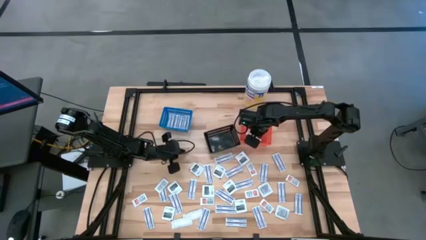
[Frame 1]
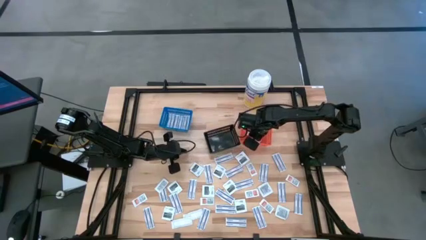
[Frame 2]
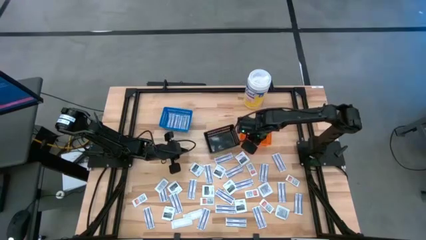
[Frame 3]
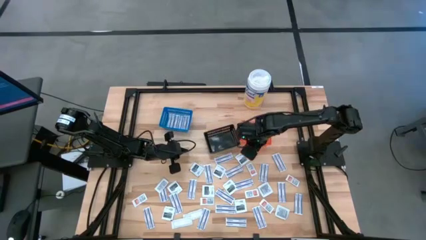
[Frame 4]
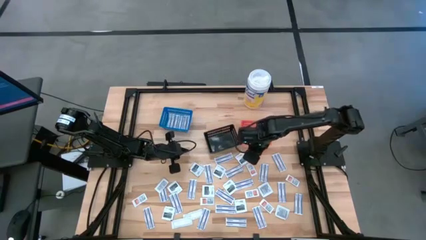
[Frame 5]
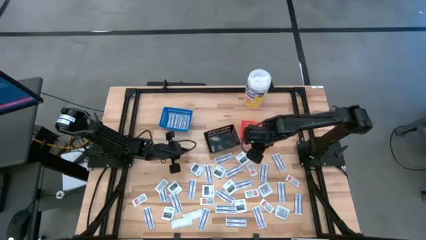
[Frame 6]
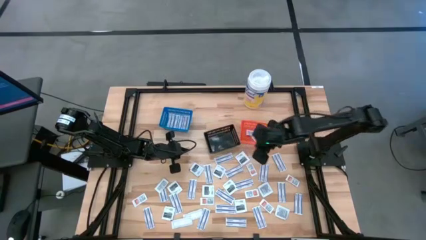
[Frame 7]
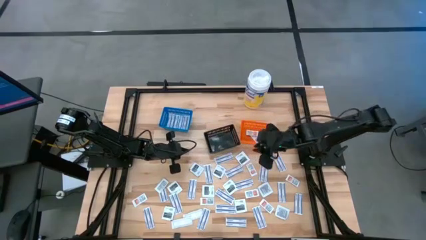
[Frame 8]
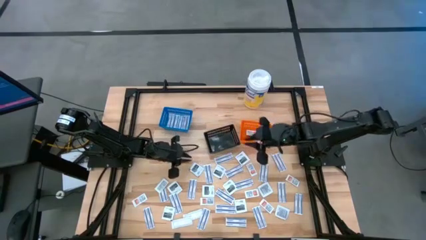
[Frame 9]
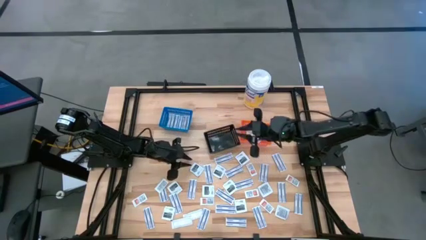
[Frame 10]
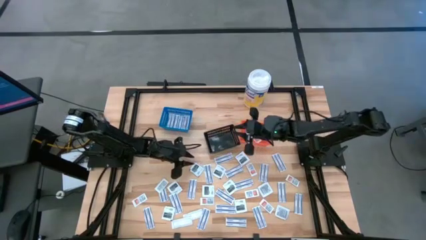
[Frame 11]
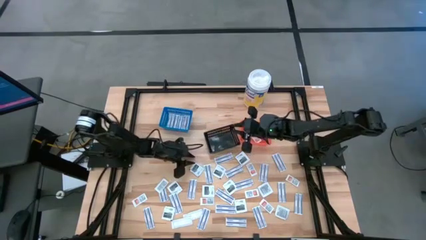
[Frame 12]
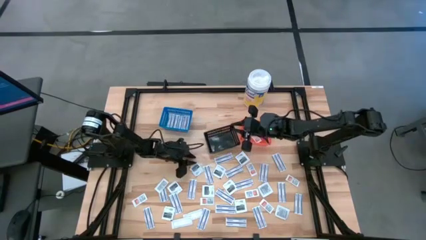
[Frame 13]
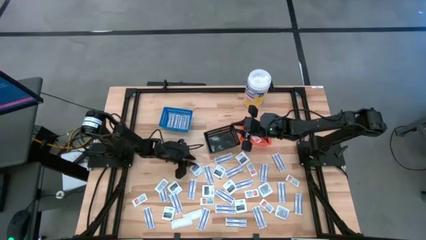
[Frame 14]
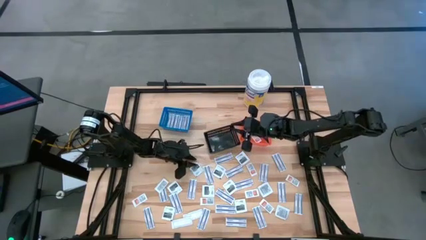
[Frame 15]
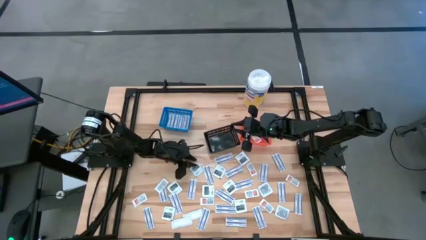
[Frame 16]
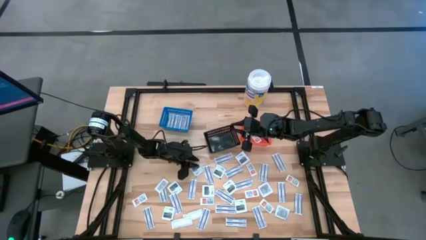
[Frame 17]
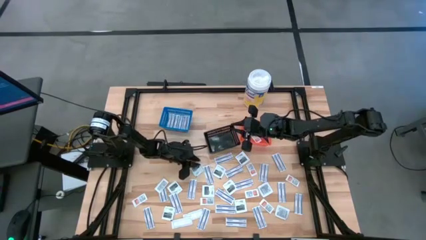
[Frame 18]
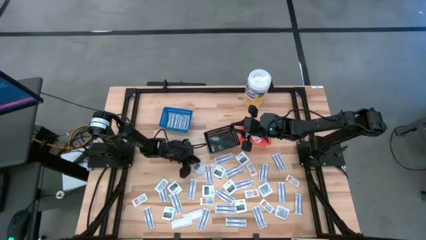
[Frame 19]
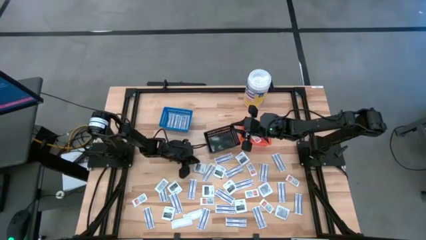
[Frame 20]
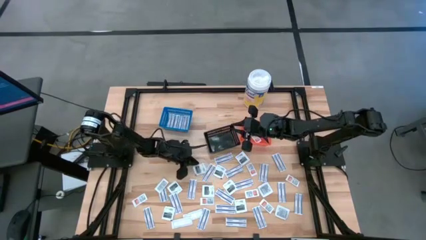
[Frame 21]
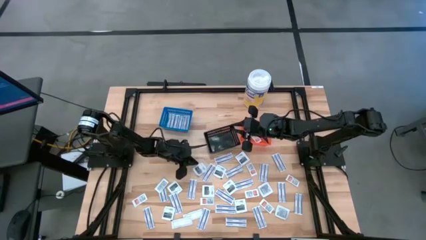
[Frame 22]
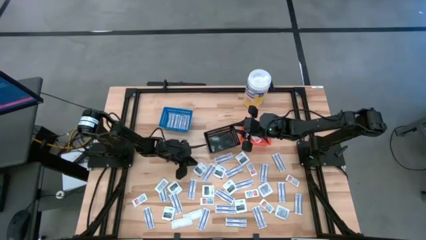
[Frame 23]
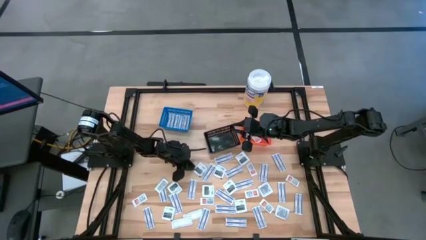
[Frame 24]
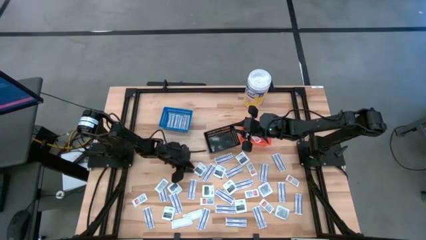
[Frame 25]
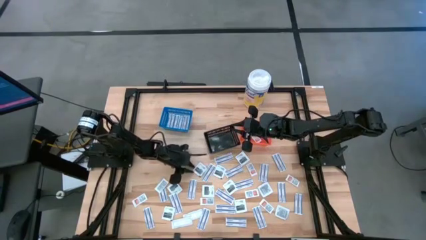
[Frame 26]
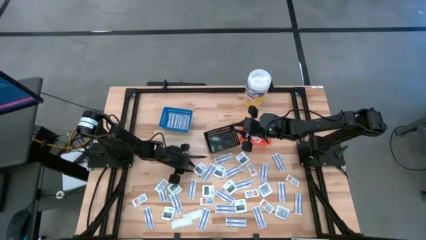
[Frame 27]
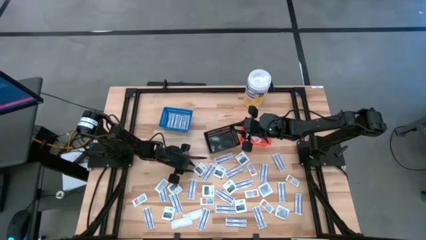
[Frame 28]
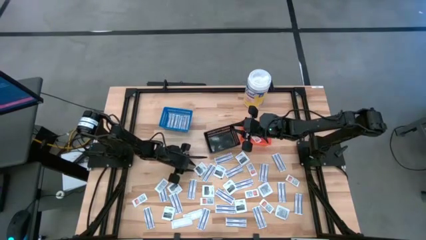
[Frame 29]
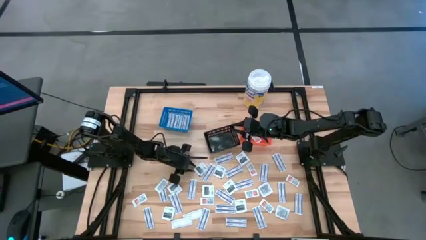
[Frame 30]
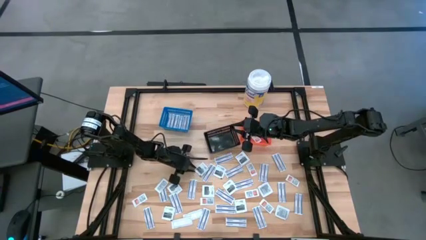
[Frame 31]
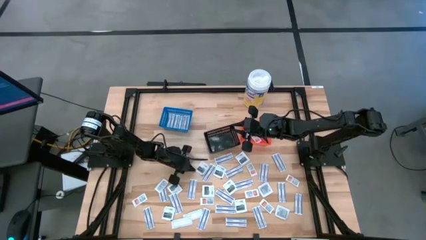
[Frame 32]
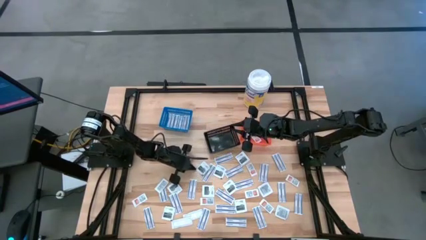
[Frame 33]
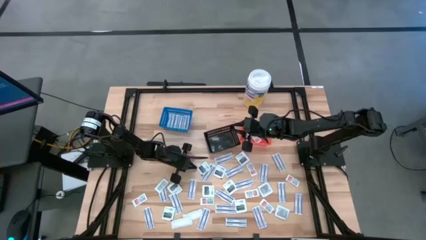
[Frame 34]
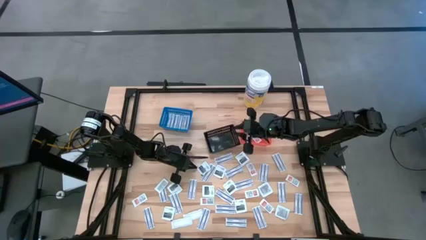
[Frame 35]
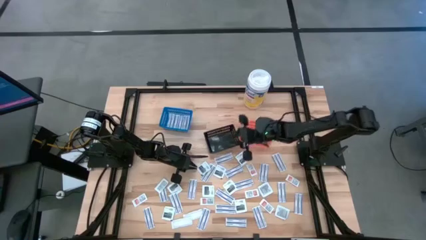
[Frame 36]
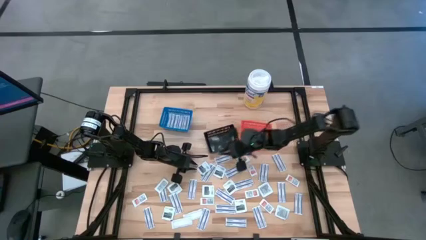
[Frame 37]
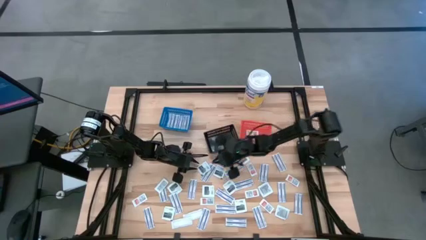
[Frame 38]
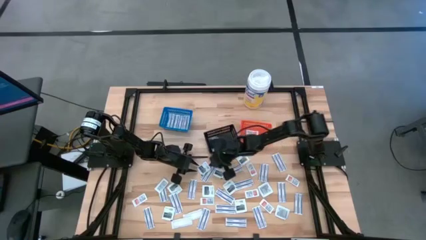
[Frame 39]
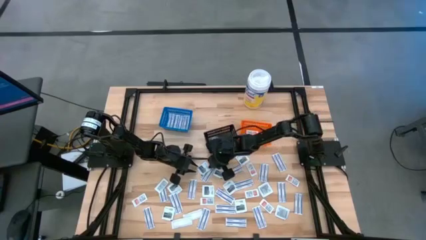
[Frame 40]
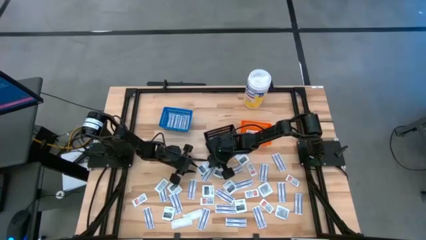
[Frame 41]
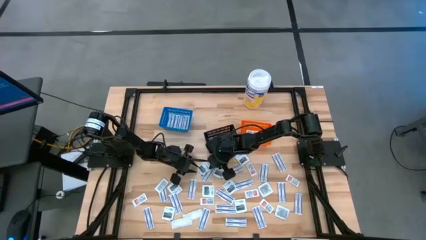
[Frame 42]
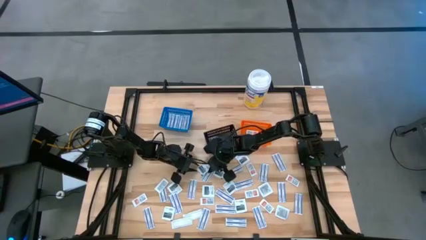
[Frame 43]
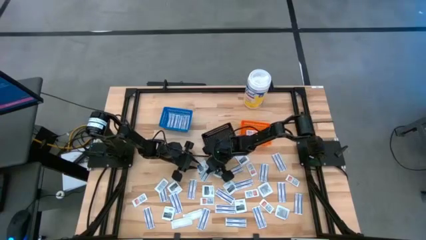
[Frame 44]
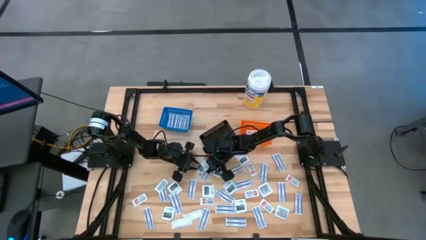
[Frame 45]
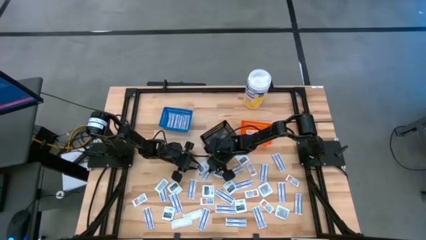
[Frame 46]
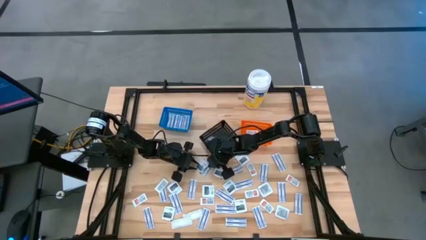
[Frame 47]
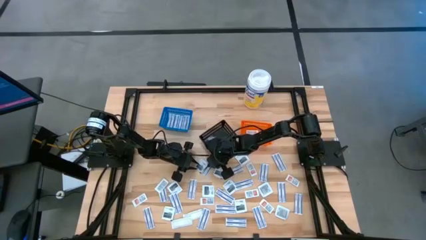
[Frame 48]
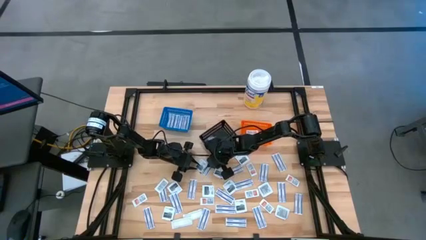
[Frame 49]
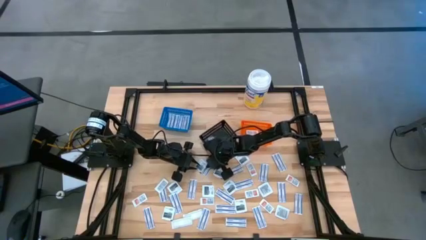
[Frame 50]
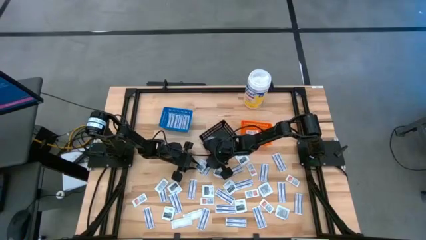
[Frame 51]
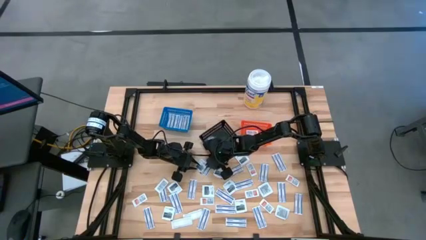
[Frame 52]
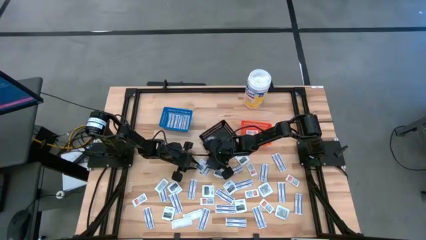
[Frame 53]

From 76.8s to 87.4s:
Task: Pick & Place First Aid Supplies
Put the towelette pack into the black bin

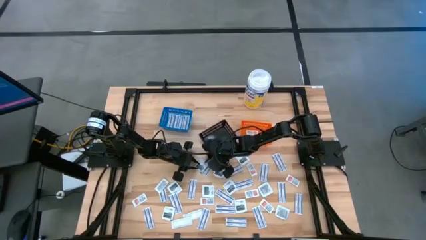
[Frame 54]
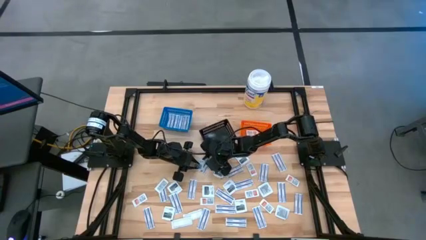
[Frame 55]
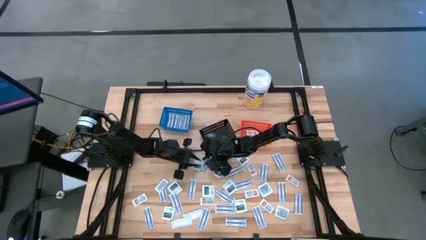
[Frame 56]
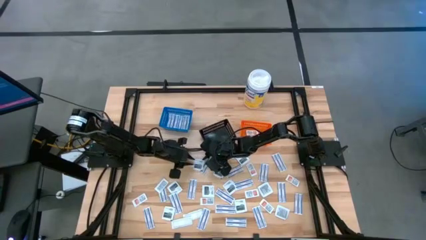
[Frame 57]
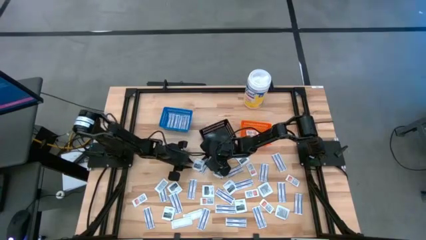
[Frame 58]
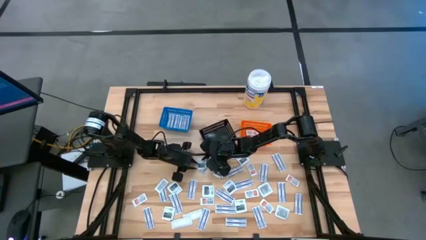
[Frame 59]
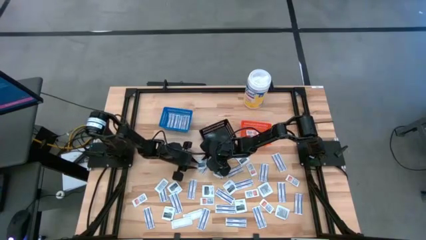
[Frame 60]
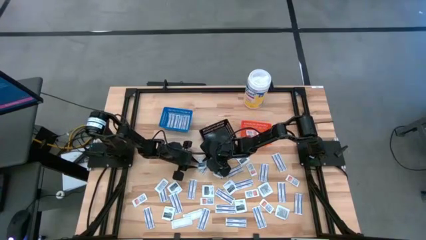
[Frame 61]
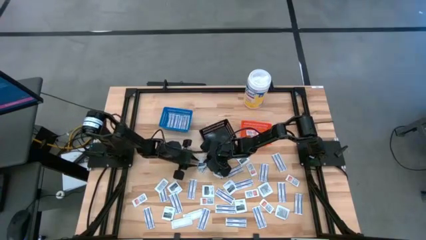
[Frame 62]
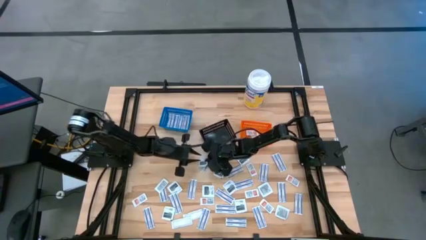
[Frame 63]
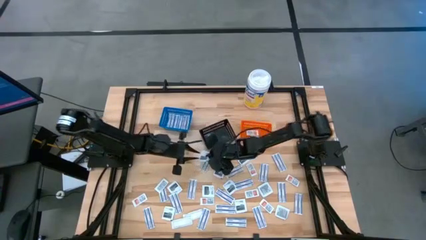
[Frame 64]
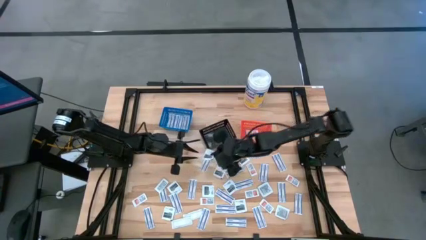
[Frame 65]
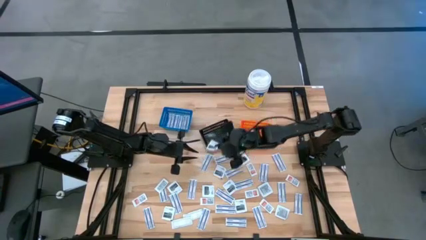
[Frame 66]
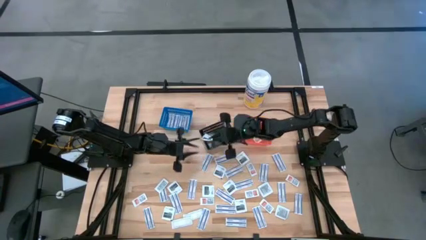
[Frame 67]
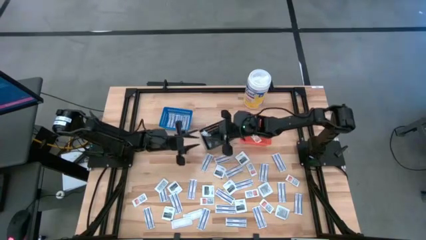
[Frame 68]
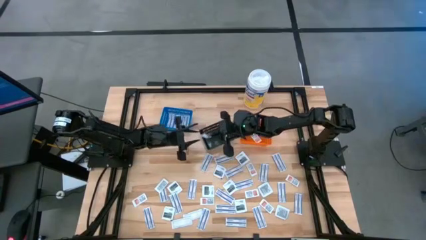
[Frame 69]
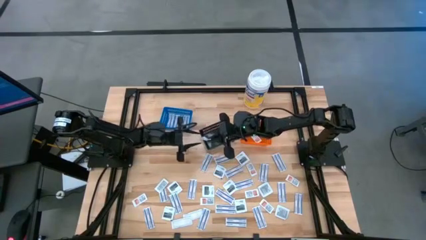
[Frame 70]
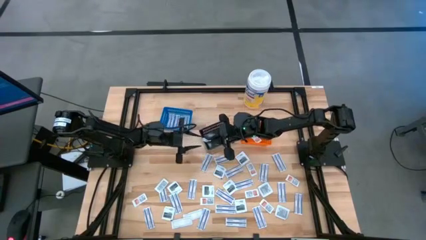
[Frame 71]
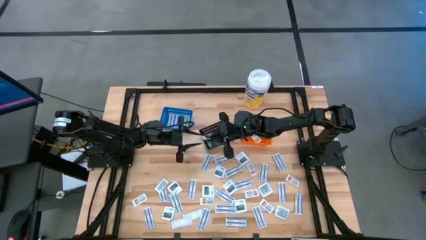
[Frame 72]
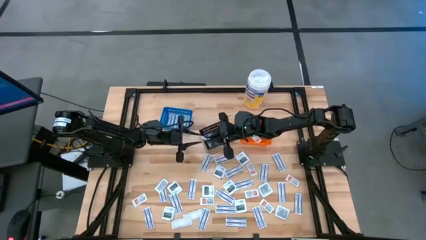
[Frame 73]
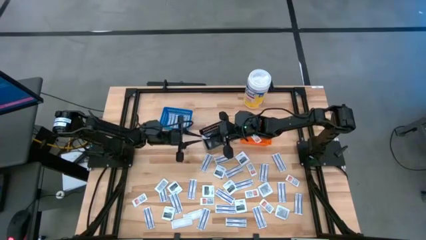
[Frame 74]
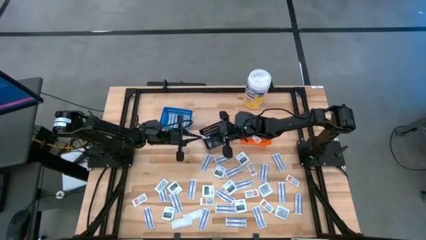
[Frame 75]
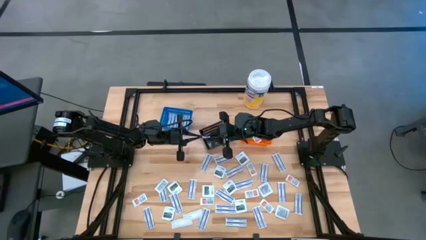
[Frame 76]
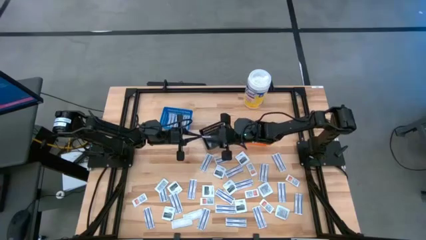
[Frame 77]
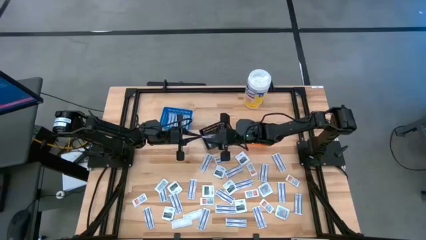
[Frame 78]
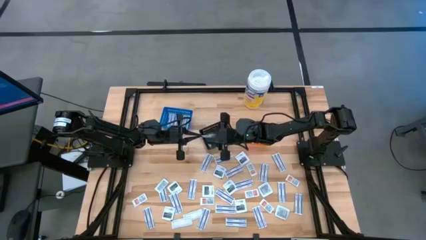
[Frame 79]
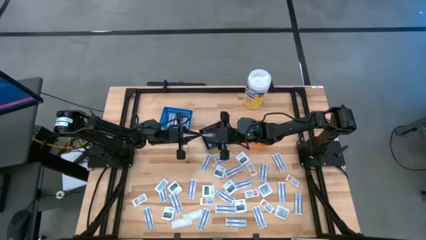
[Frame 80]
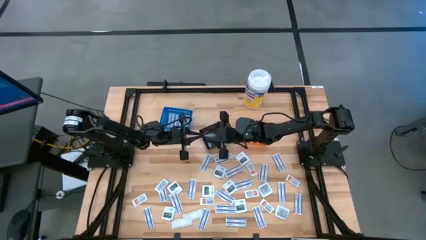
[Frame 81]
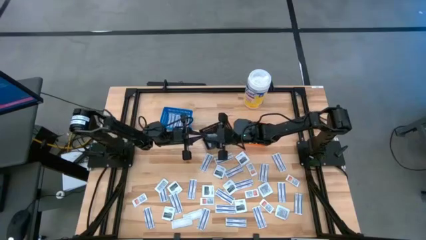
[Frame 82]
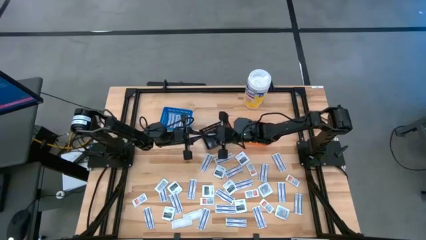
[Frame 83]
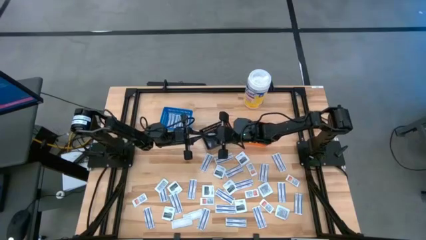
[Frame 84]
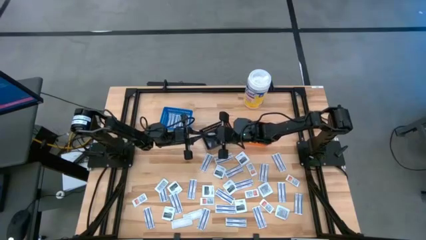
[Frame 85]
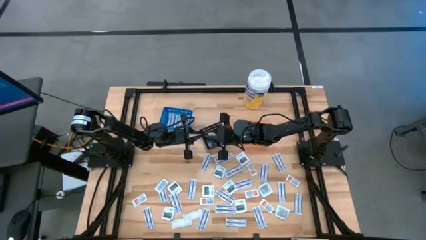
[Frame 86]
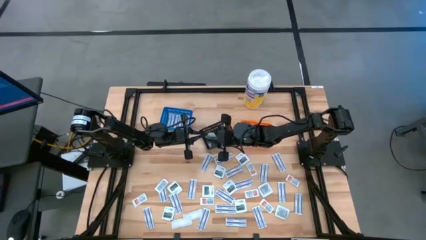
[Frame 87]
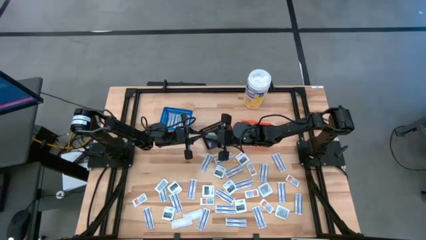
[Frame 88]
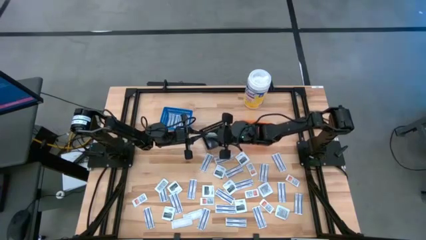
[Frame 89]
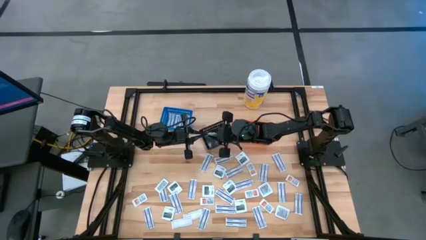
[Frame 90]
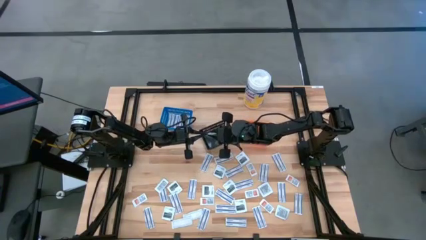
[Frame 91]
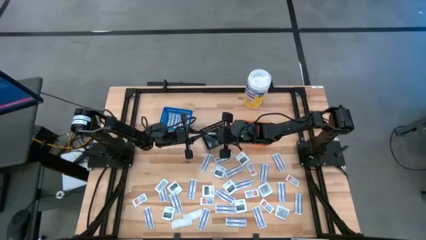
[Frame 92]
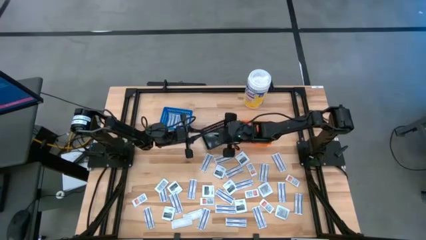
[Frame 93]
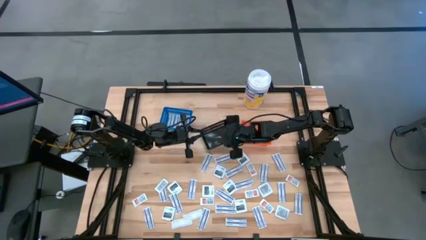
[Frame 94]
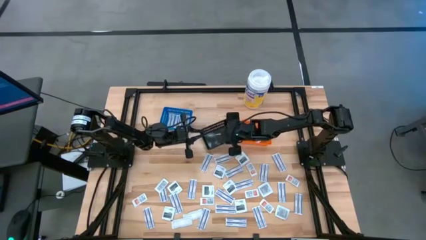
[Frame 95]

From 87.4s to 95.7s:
Put the towelette pack into the black bin
